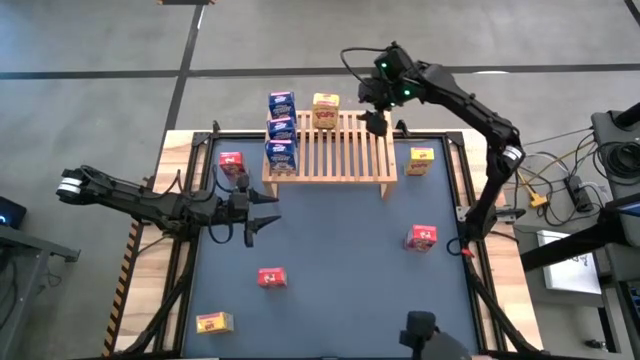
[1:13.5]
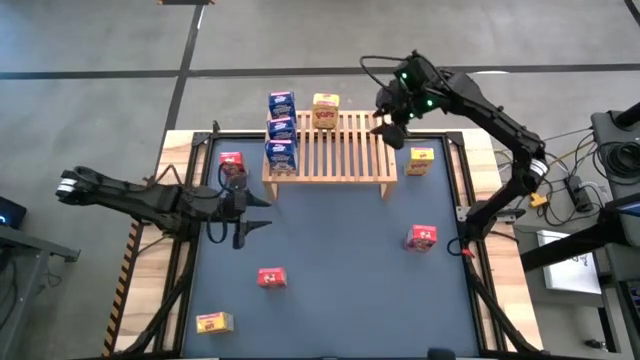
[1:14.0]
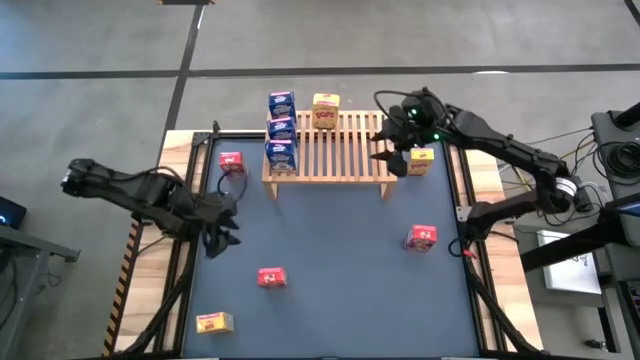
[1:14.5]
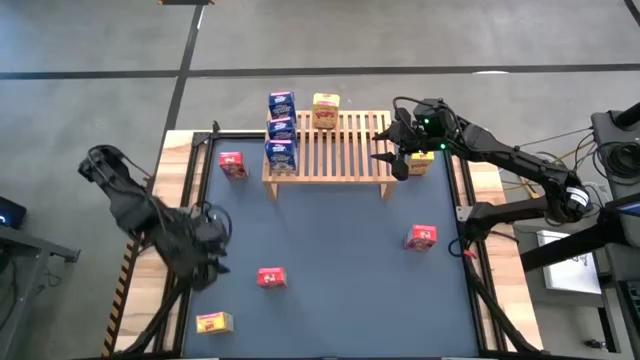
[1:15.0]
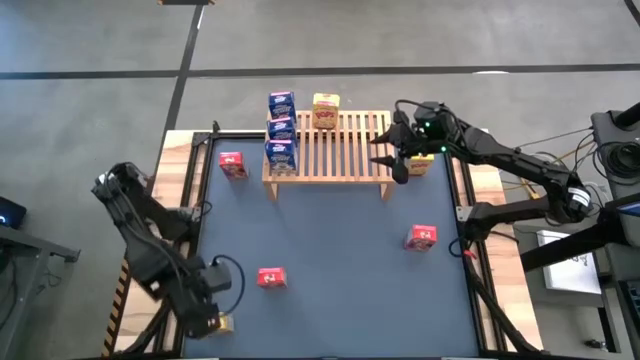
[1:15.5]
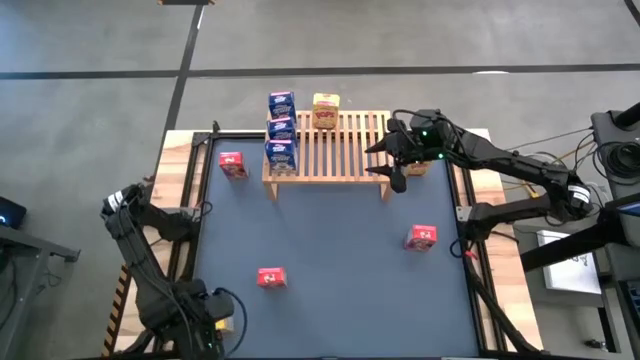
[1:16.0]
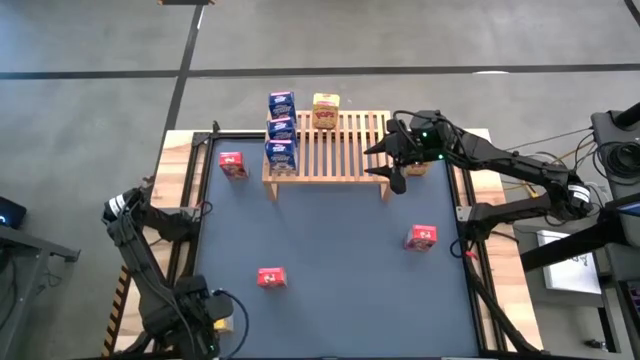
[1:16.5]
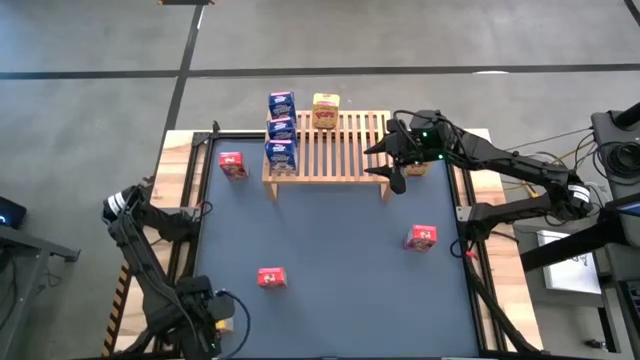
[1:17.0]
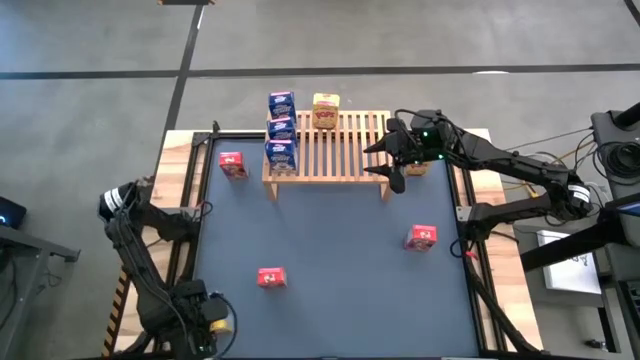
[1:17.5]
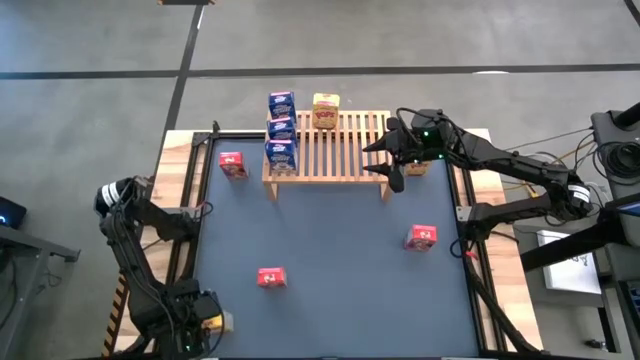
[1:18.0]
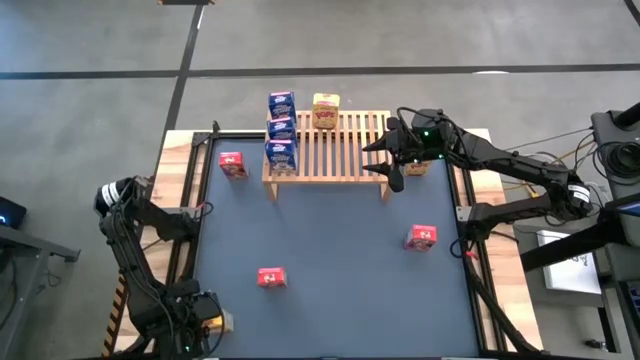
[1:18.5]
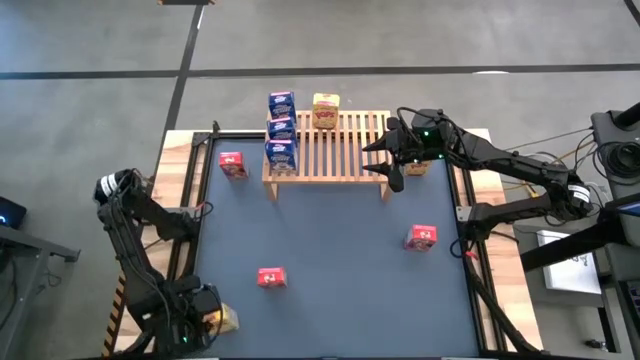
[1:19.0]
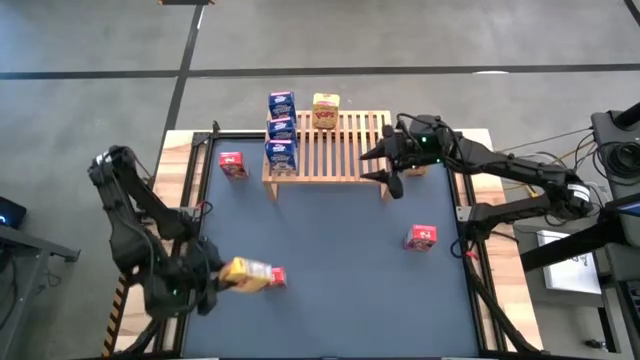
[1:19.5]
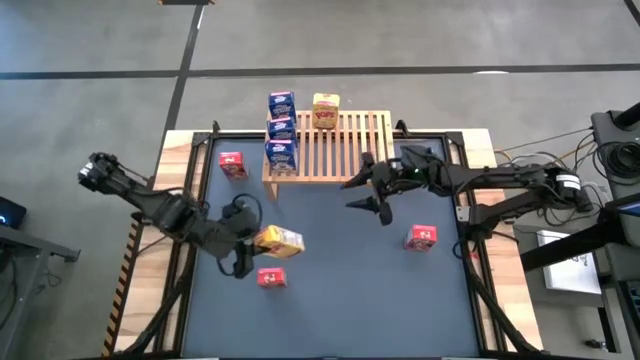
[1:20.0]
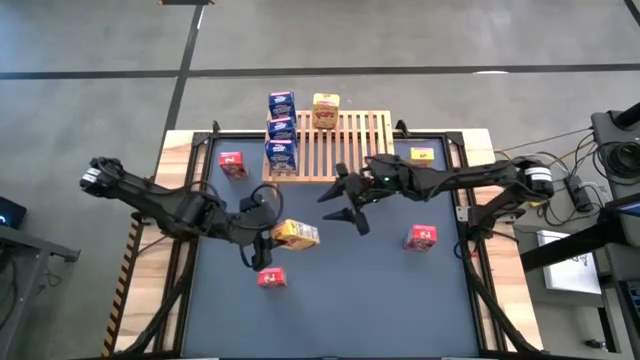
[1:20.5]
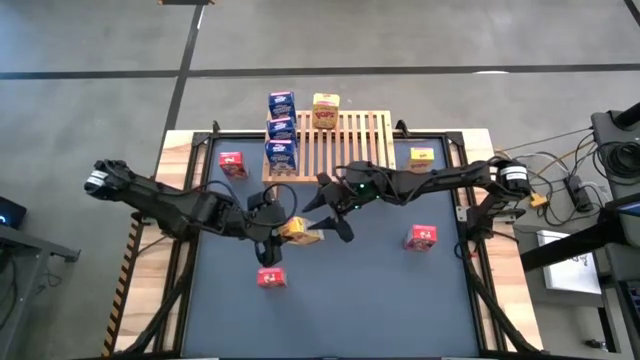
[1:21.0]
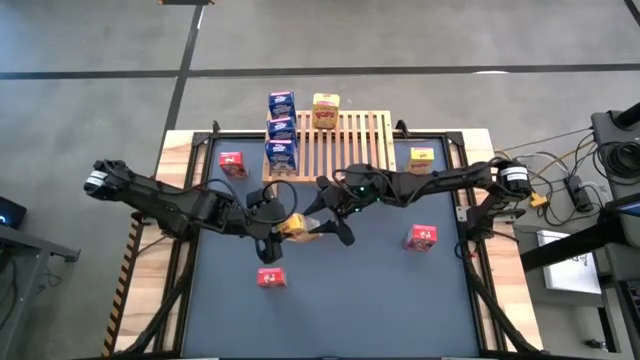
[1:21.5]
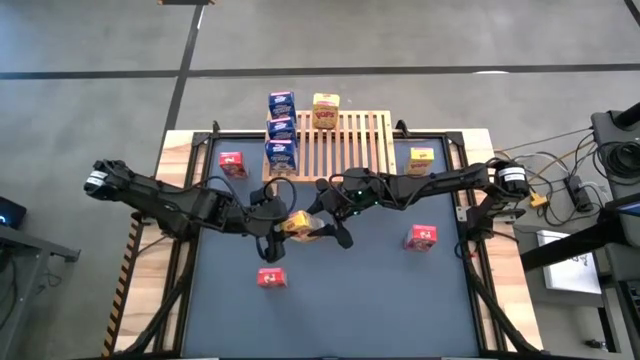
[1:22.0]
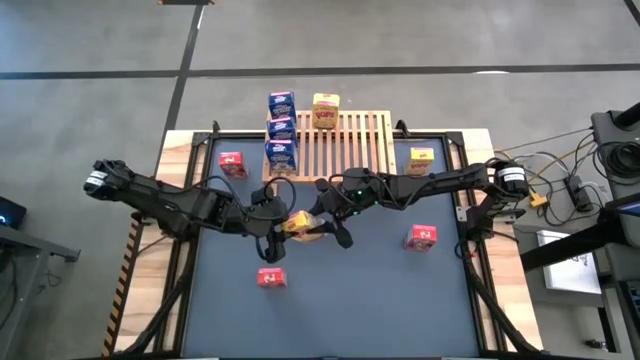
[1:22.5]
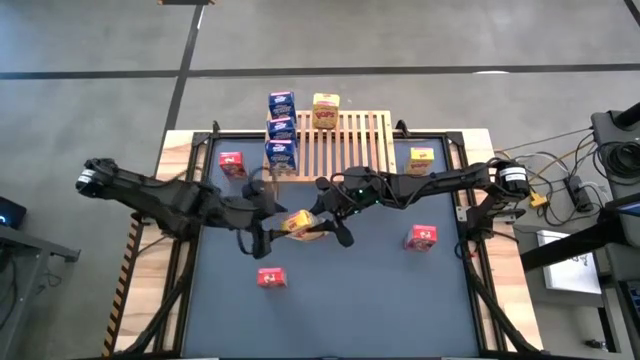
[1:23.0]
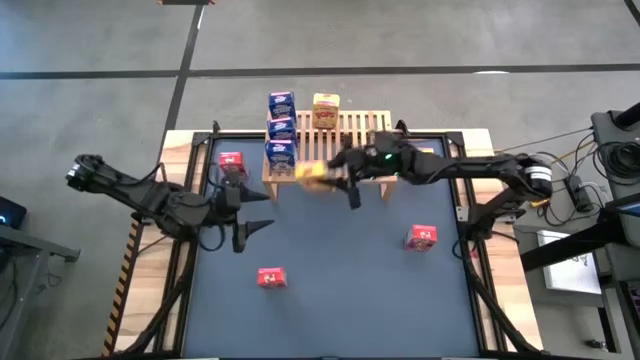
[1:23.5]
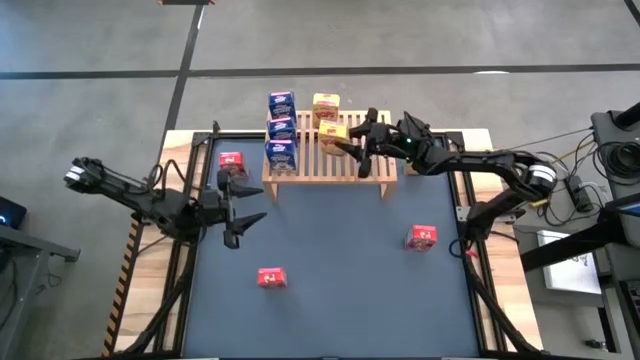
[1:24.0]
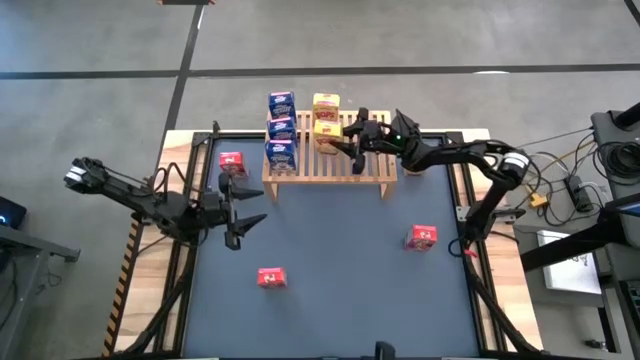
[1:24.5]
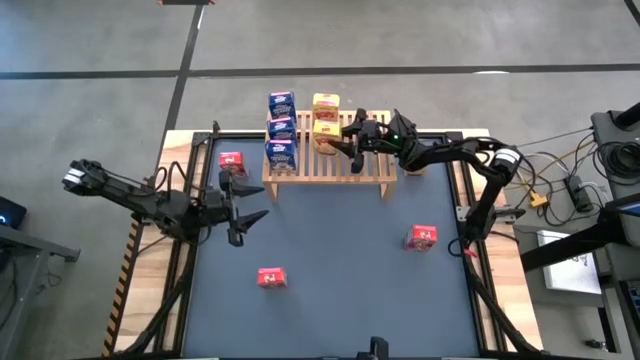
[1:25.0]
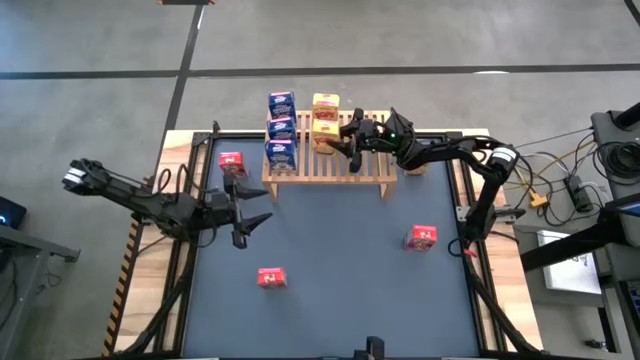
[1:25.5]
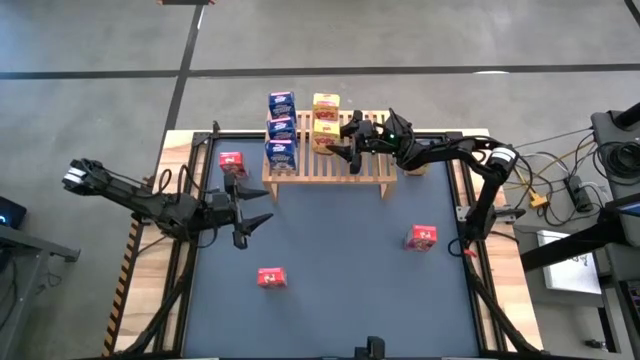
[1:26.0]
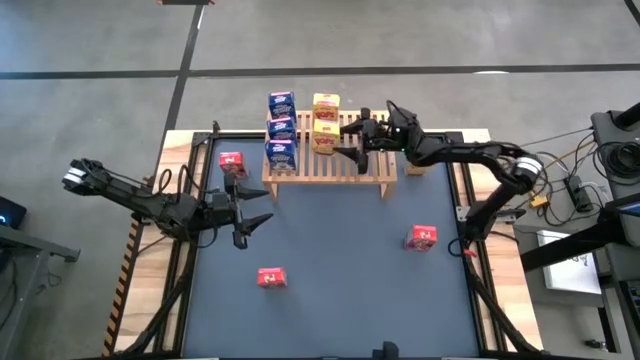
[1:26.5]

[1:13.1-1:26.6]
Task: Stack cereal on shelf
Put the bottom yellow cereal box on the shelf aligned with the other yellow cereal box

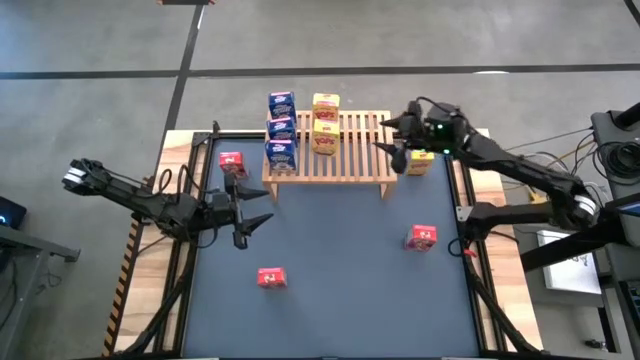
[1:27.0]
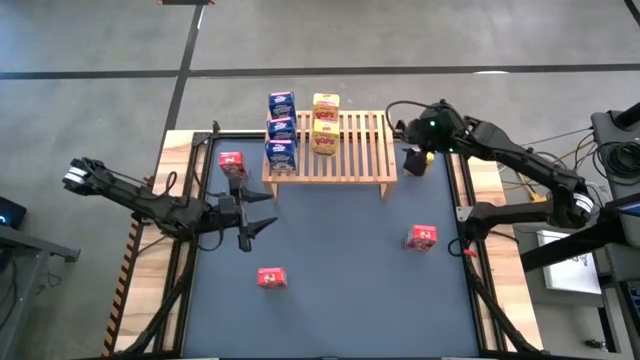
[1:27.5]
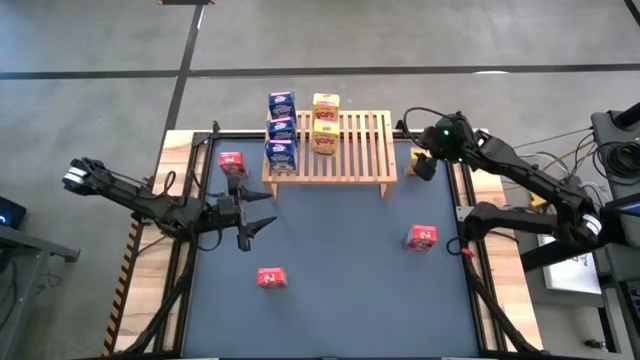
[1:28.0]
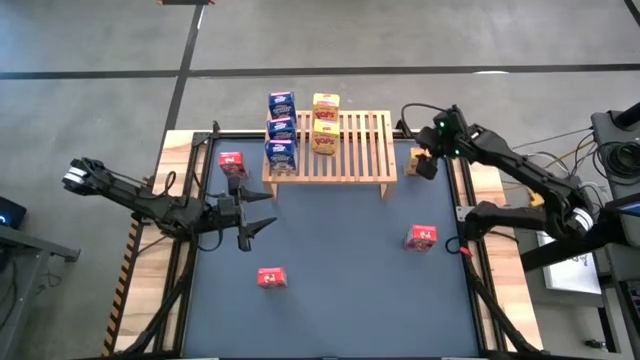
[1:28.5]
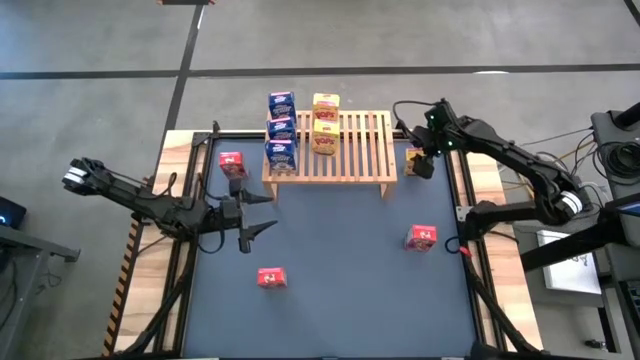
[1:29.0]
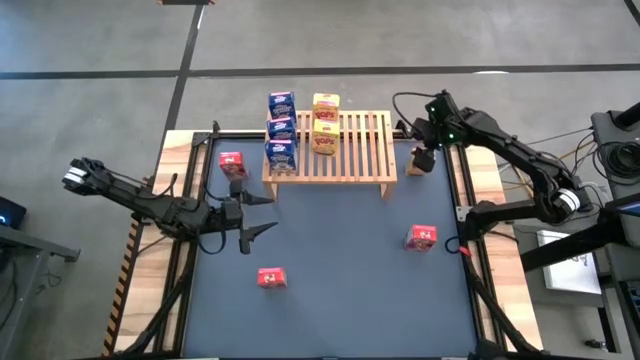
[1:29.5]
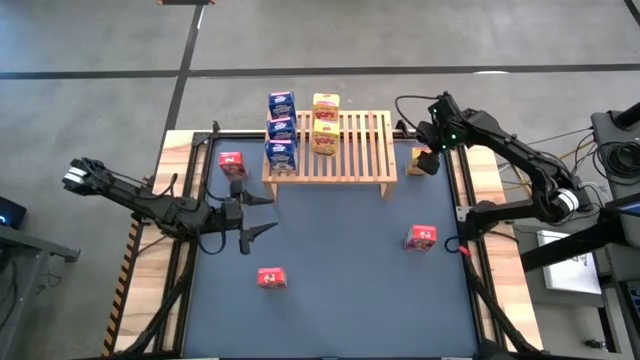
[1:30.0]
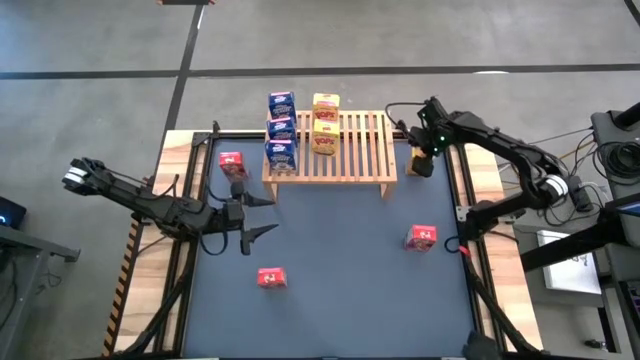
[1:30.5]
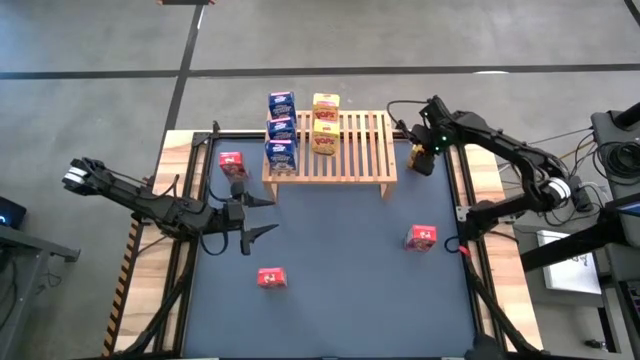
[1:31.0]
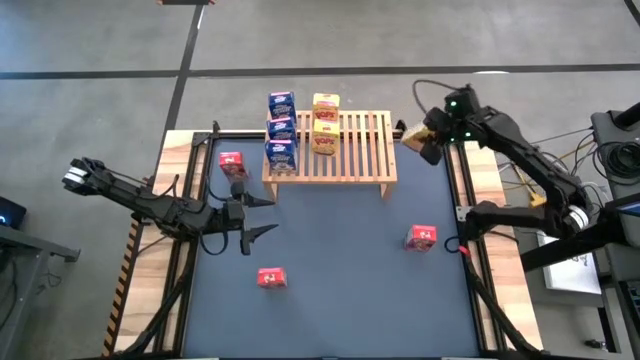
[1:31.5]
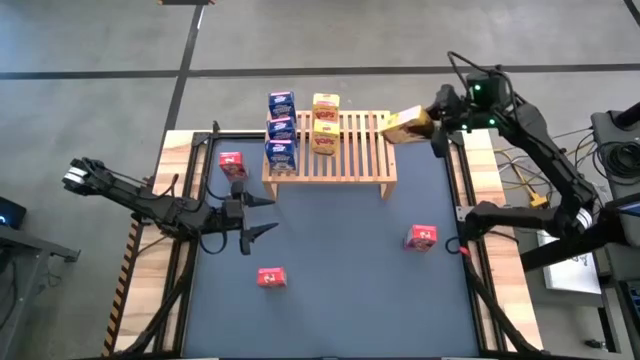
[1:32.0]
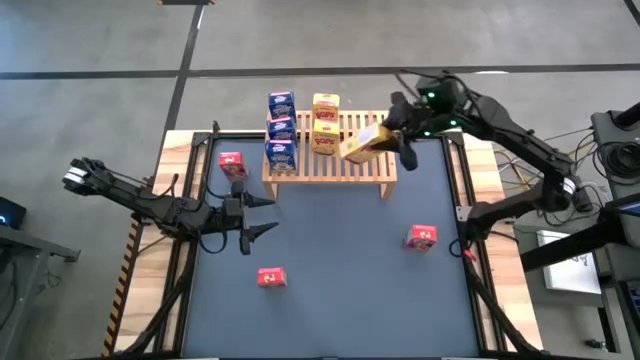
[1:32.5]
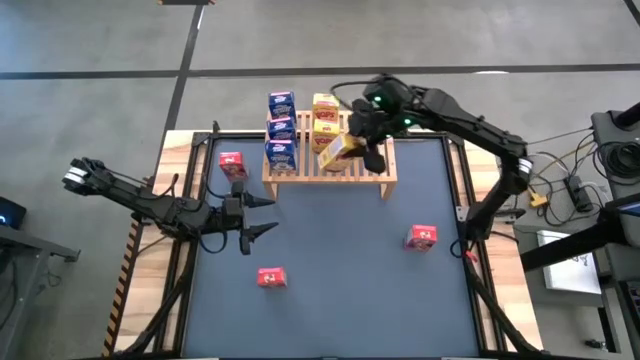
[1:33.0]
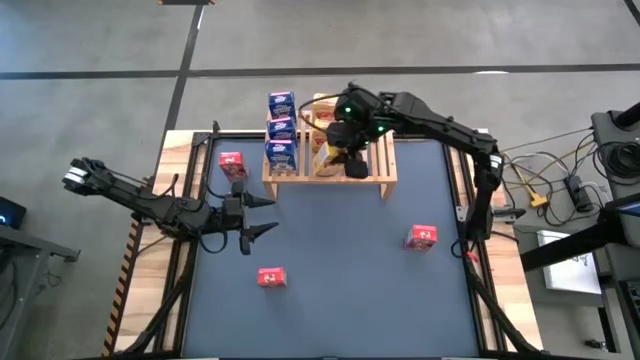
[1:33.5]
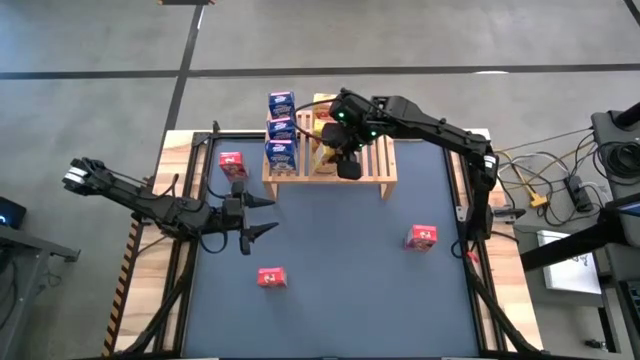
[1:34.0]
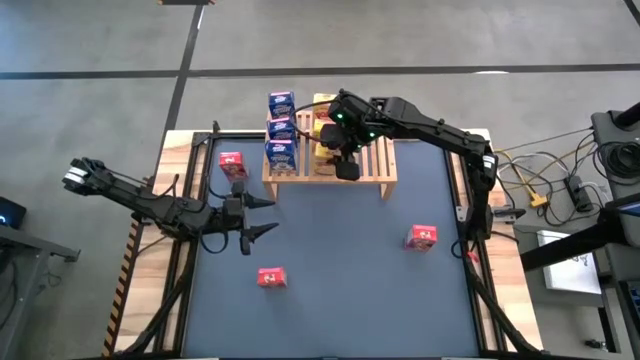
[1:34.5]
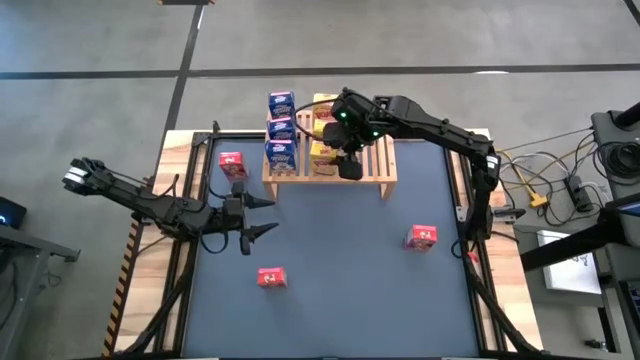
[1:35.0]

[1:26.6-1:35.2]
Put the yellow cereal box on the shelf aligned with the other yellow cereal boxes
